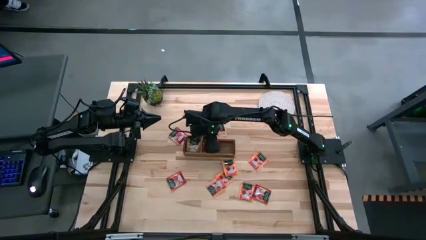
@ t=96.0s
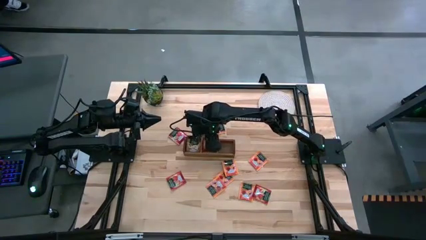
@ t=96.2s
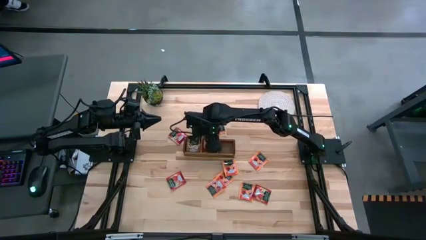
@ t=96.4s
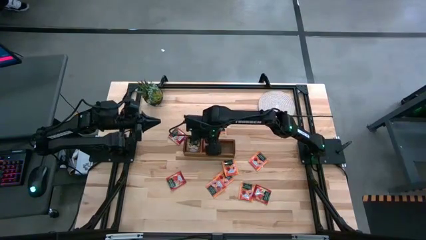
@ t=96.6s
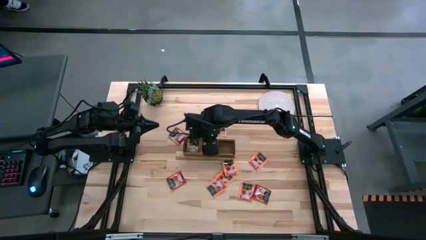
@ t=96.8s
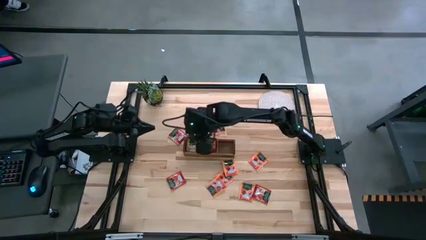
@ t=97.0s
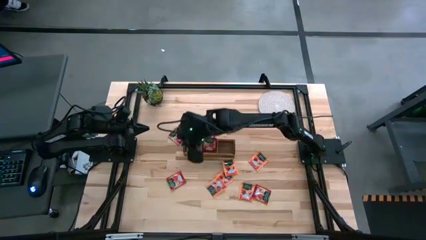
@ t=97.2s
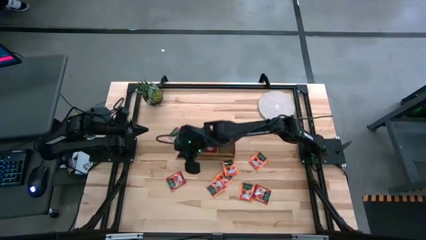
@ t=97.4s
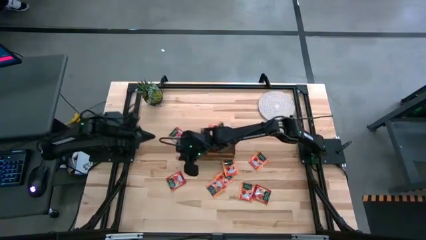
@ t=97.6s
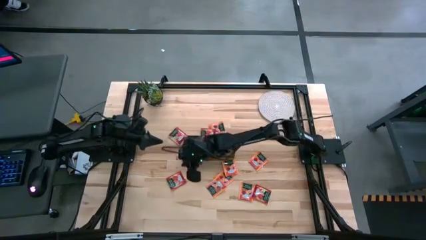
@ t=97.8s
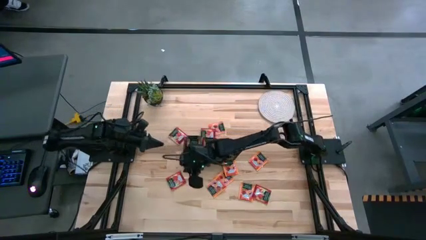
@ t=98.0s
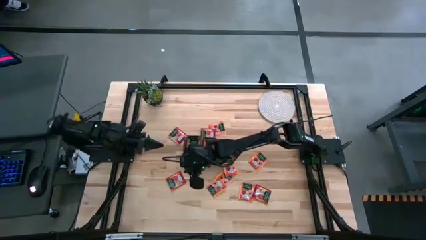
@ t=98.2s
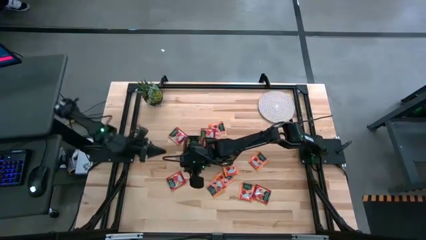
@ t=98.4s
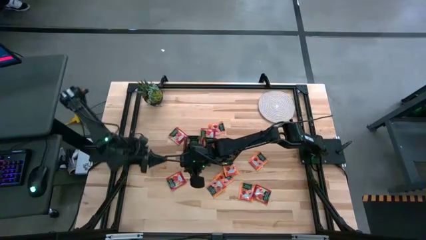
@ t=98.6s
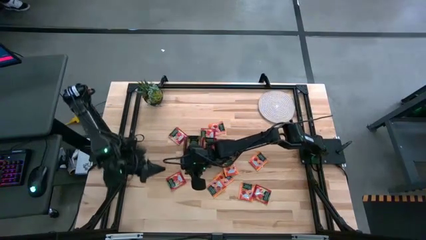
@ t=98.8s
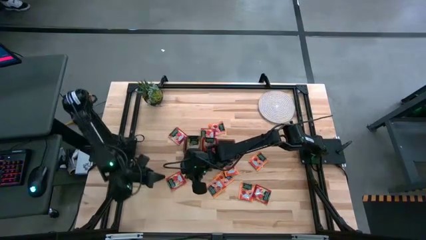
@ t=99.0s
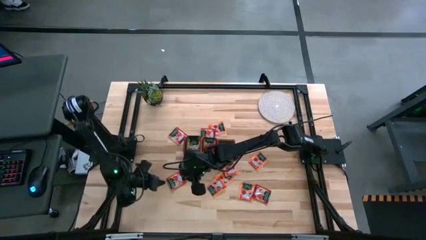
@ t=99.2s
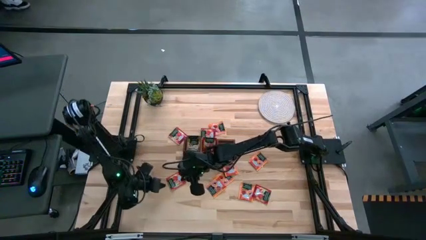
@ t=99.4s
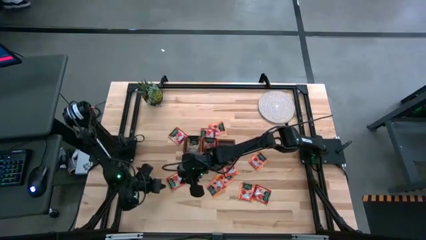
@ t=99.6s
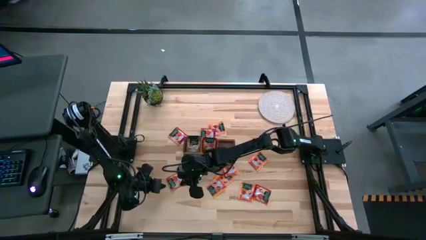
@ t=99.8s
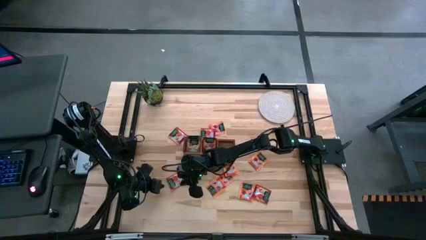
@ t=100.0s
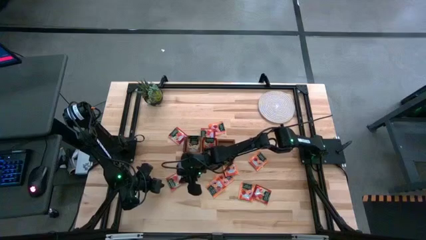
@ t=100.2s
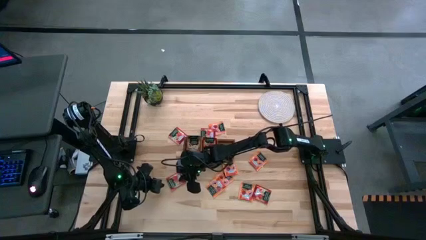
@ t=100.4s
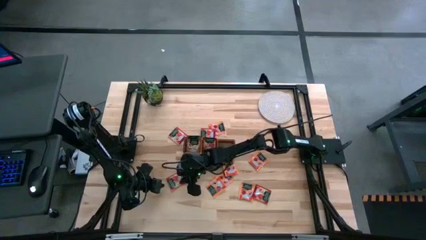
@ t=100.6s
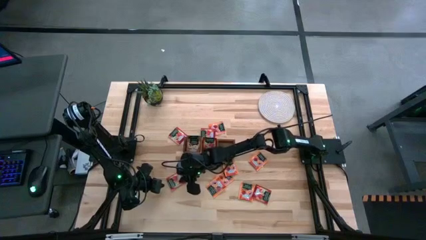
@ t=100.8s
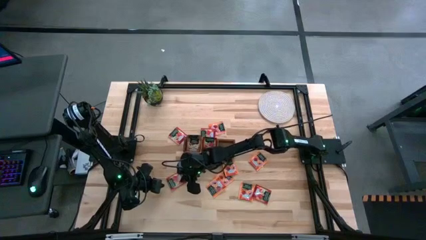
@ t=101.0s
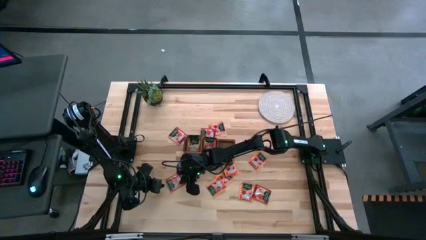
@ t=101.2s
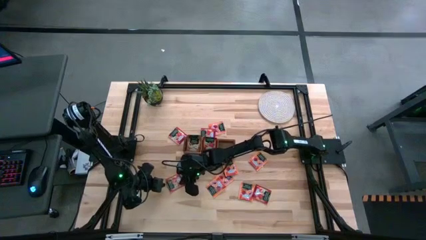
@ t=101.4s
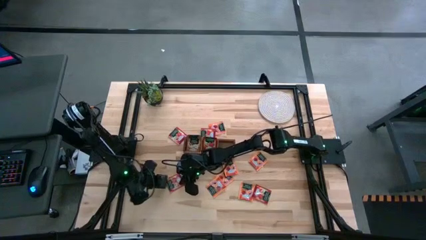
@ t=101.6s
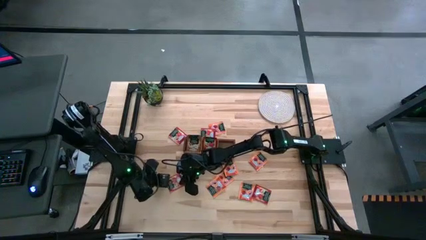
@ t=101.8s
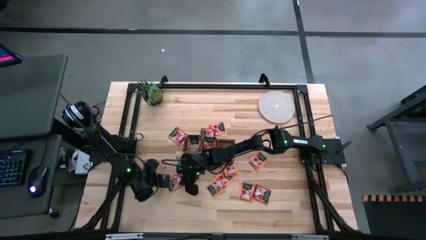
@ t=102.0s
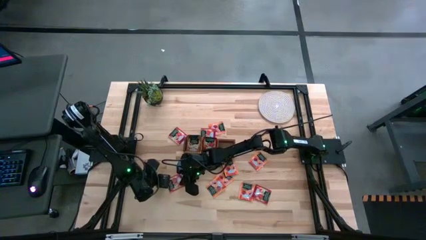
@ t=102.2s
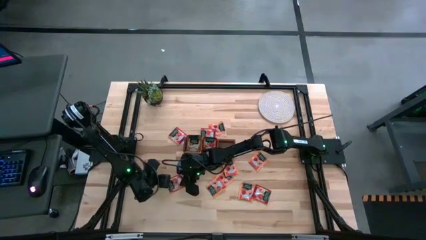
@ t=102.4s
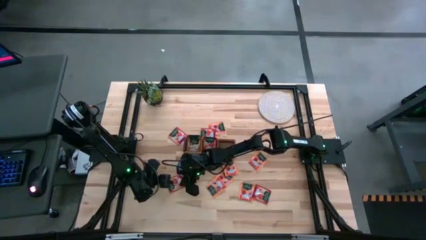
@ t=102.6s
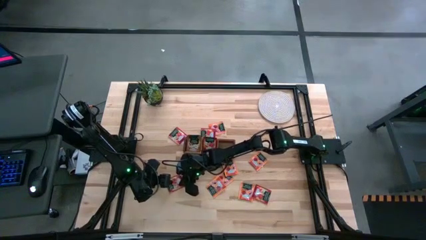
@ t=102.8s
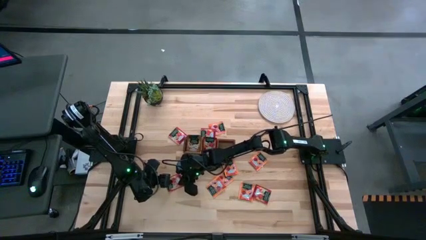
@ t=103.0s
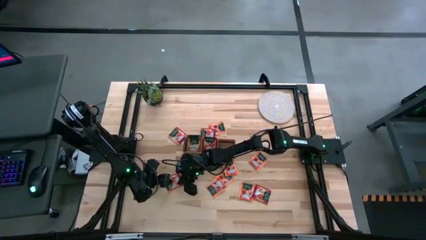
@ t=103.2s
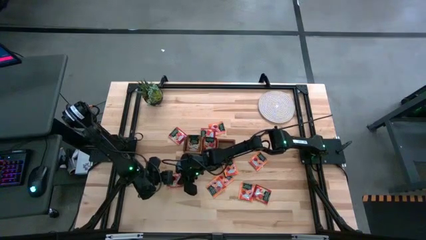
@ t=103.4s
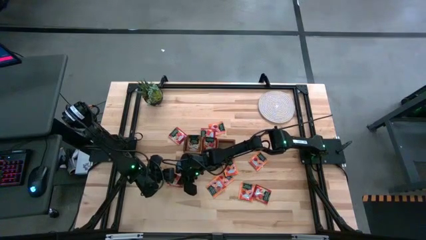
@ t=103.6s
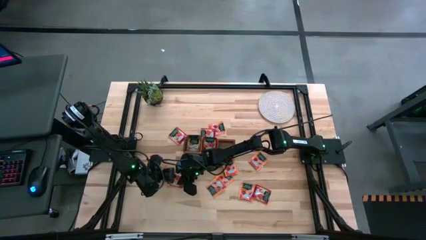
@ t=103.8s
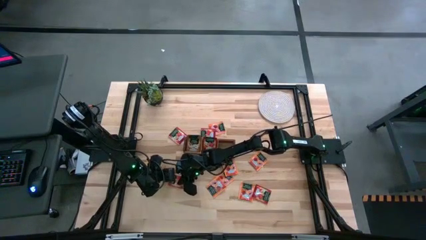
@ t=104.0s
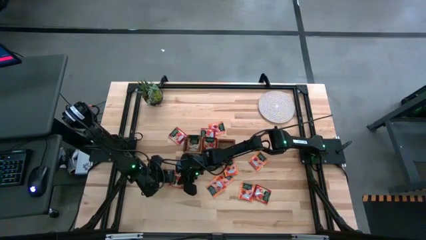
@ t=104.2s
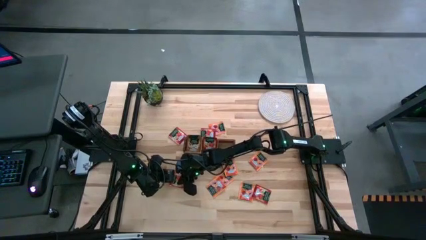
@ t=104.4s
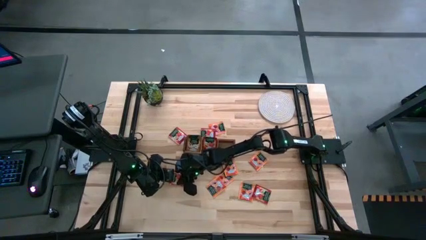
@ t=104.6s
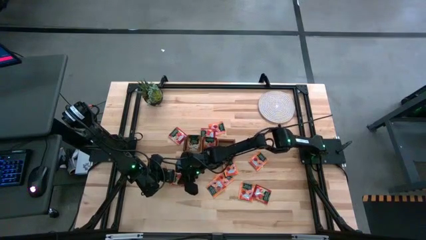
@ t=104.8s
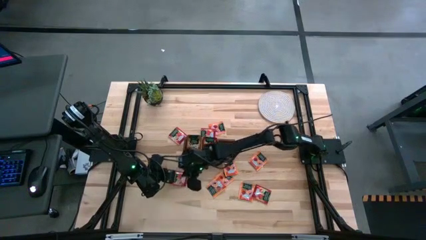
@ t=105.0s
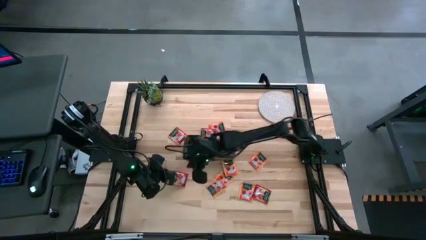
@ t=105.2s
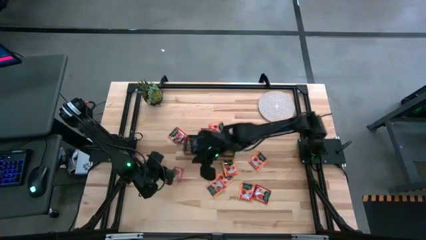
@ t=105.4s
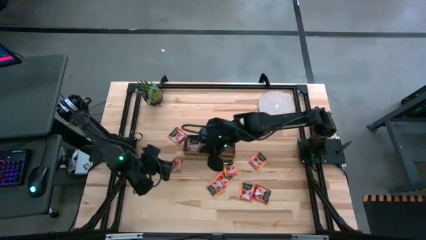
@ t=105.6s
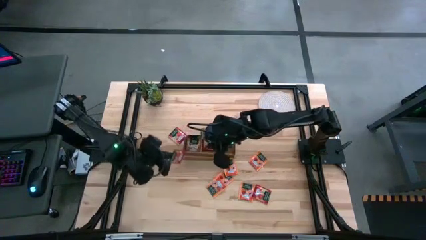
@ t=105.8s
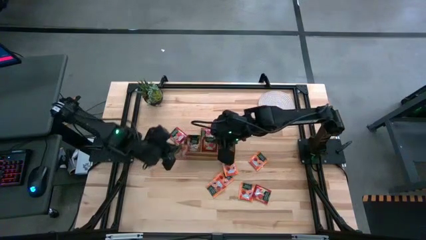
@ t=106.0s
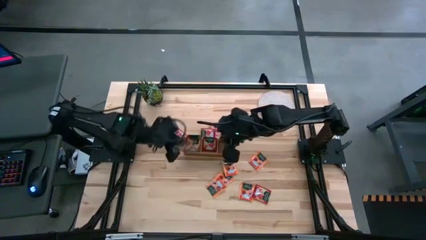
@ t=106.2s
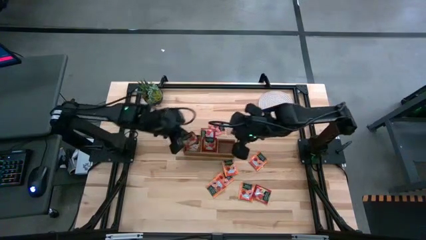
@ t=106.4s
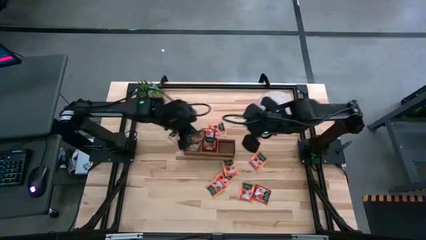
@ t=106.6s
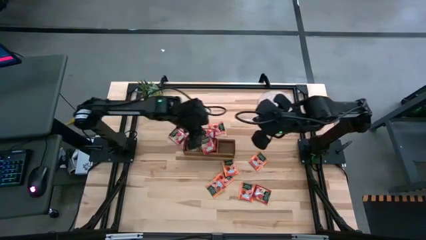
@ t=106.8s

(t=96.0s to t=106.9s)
Task: Pick & Place Tea
Put the red tea bag into the middle section of the brown wooden organizer

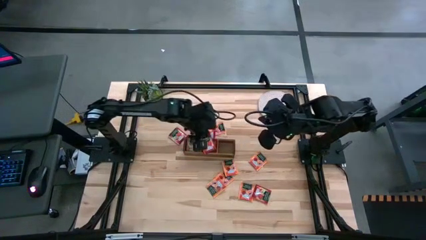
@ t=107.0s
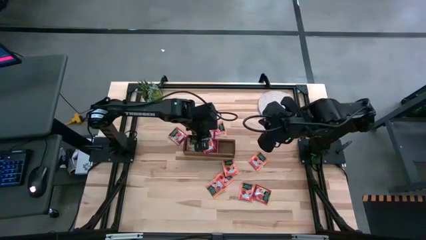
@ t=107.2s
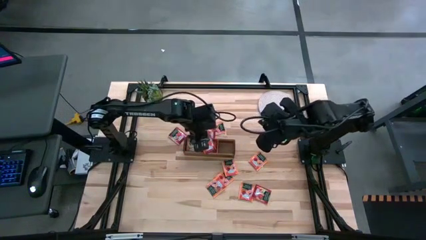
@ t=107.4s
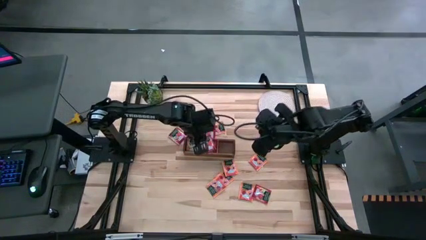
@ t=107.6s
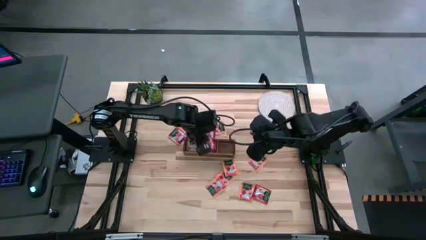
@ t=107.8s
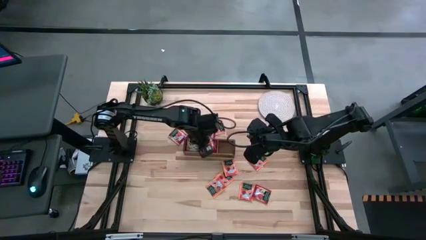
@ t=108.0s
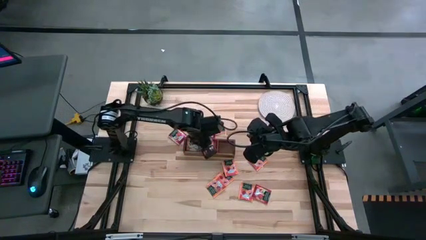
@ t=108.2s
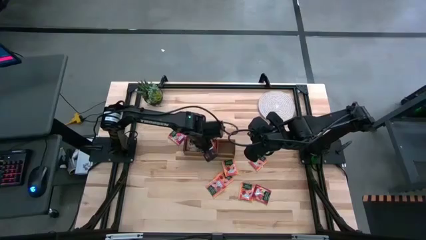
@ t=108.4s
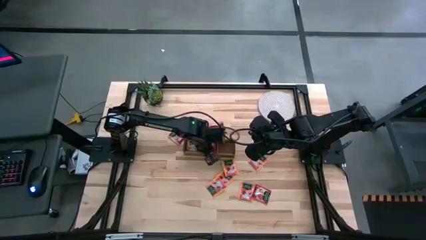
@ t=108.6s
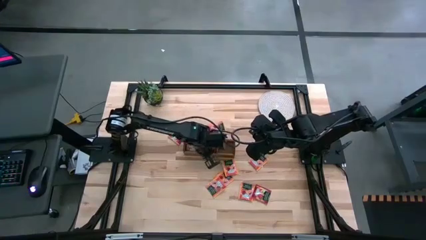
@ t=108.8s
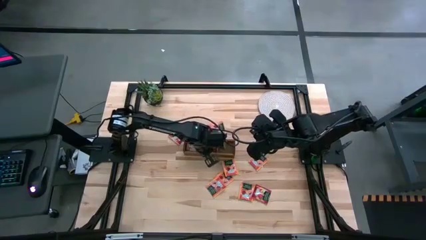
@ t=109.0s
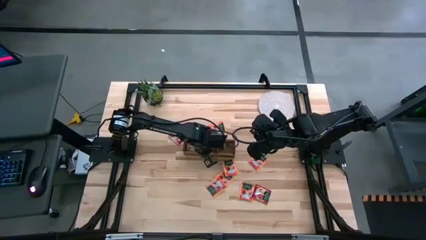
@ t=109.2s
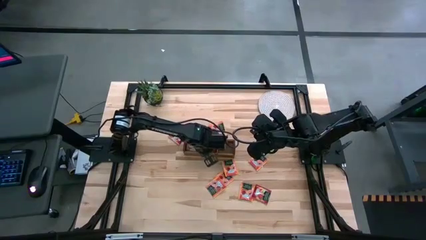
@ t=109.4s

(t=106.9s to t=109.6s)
Put the red tea bag into the middle section of the brown wooden organizer
